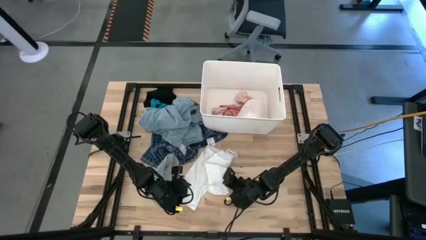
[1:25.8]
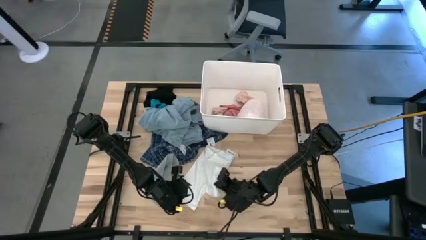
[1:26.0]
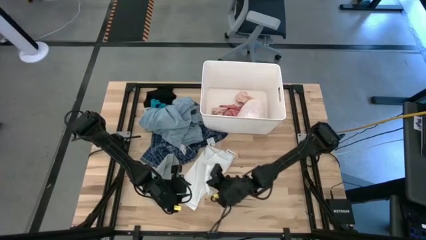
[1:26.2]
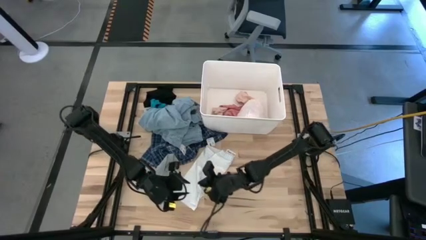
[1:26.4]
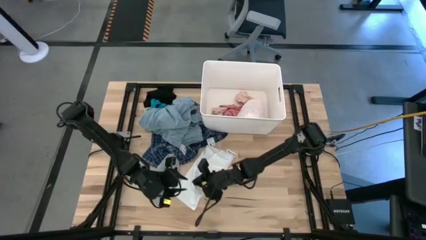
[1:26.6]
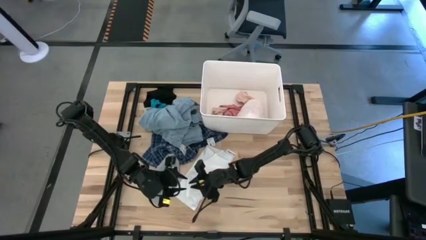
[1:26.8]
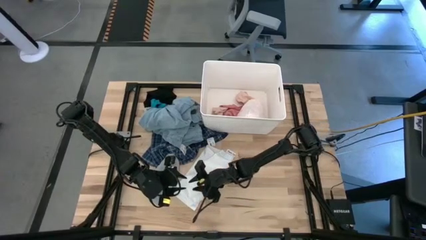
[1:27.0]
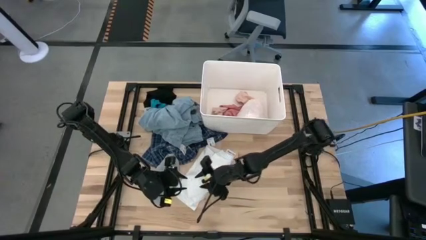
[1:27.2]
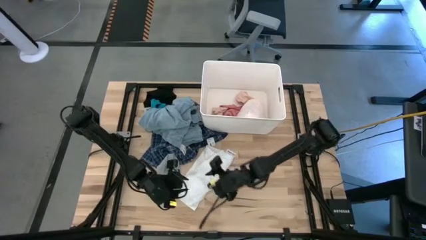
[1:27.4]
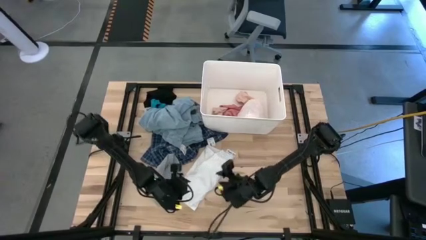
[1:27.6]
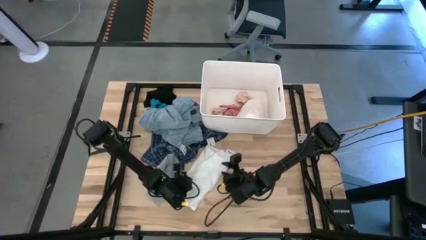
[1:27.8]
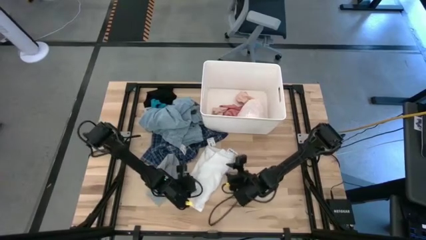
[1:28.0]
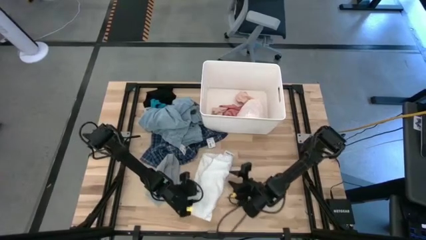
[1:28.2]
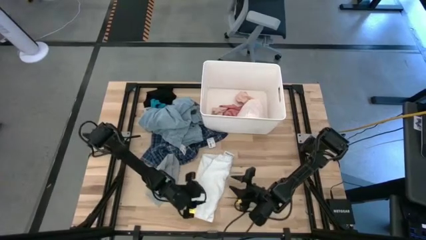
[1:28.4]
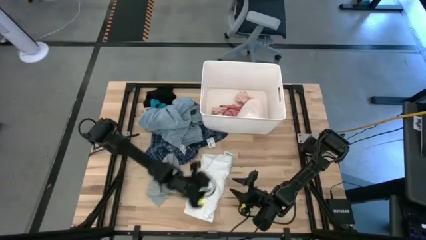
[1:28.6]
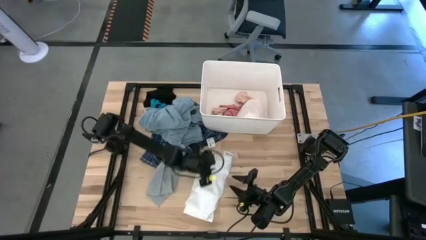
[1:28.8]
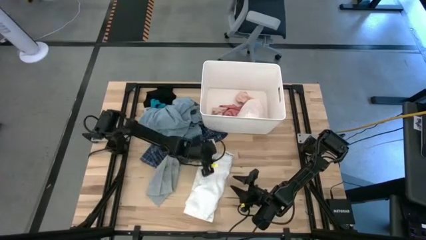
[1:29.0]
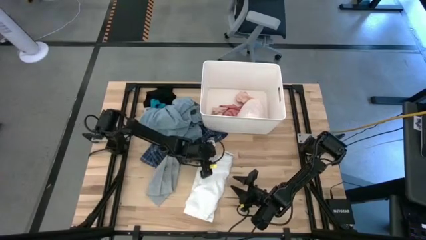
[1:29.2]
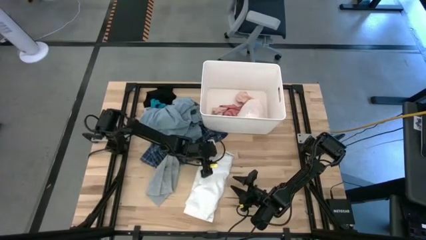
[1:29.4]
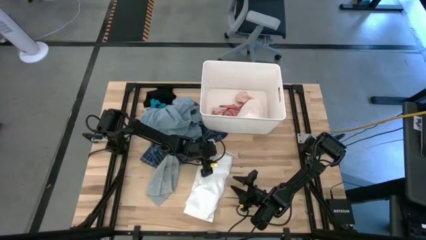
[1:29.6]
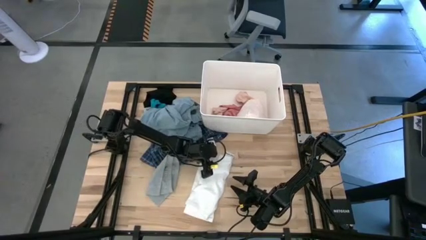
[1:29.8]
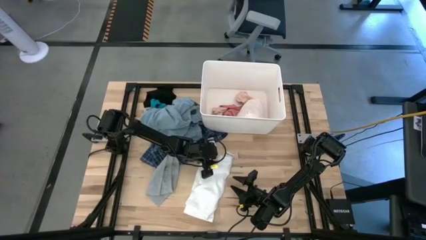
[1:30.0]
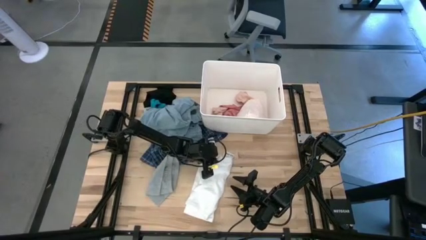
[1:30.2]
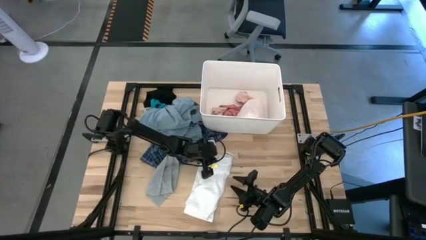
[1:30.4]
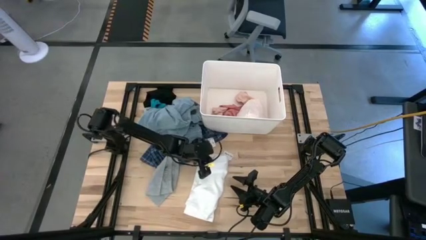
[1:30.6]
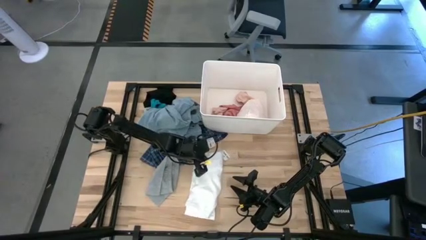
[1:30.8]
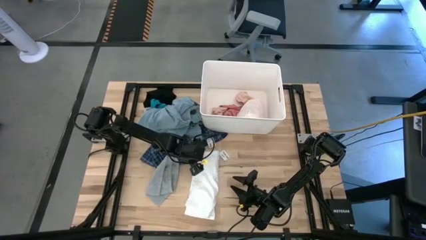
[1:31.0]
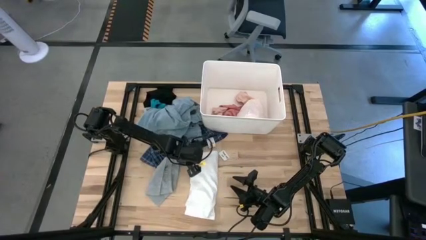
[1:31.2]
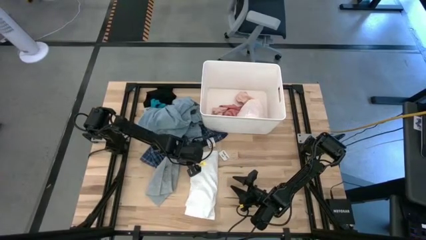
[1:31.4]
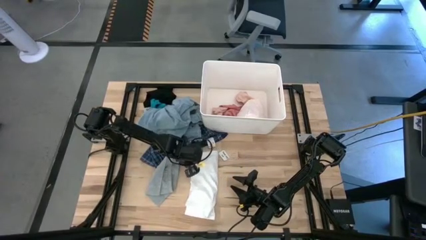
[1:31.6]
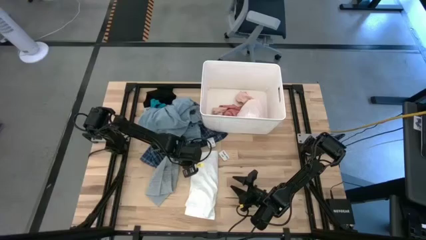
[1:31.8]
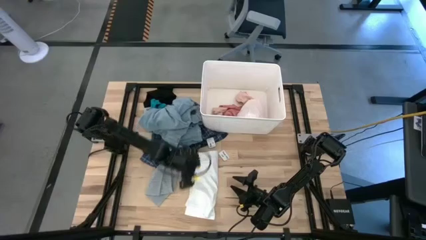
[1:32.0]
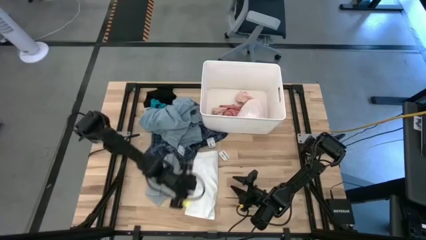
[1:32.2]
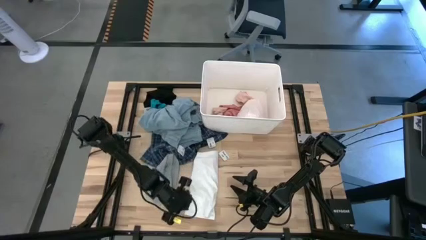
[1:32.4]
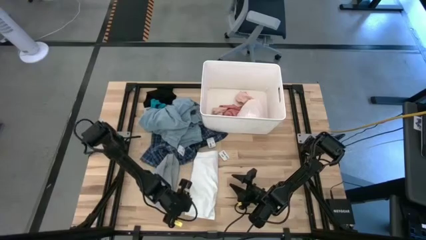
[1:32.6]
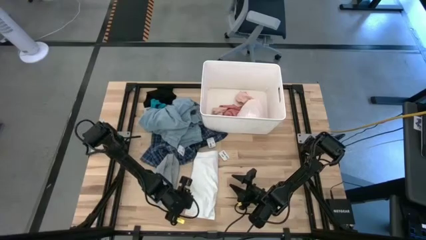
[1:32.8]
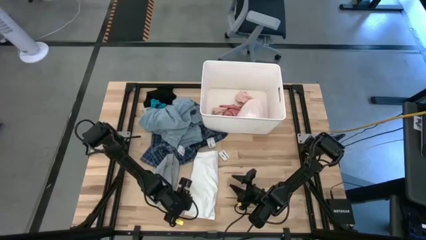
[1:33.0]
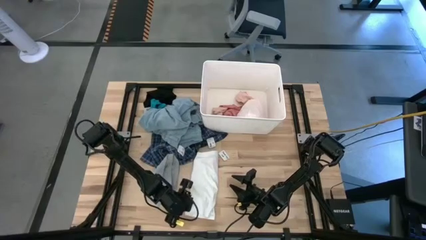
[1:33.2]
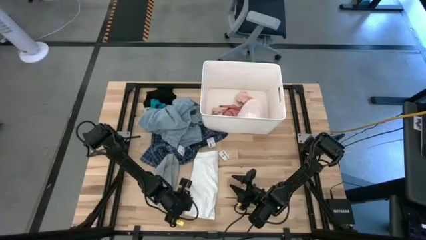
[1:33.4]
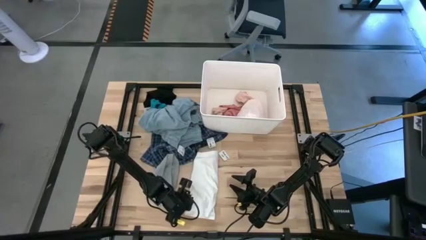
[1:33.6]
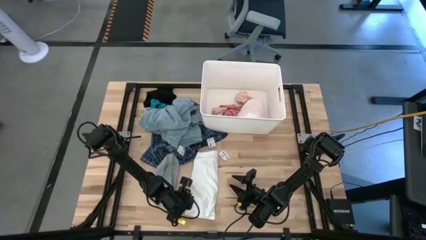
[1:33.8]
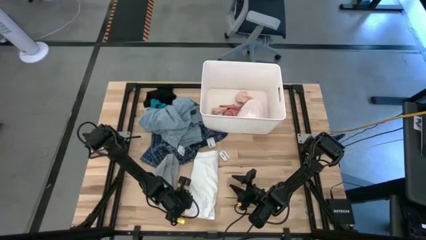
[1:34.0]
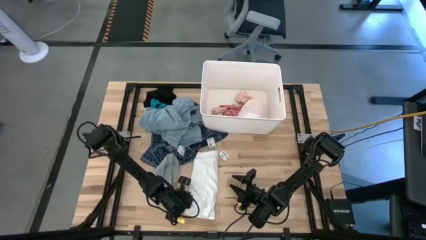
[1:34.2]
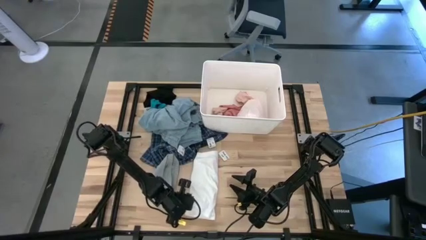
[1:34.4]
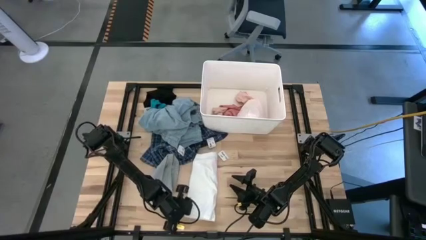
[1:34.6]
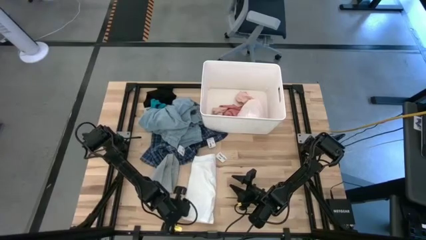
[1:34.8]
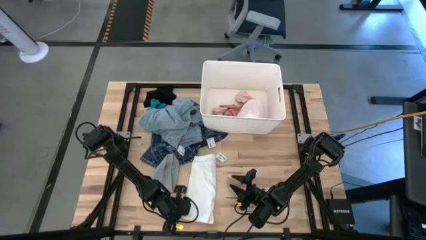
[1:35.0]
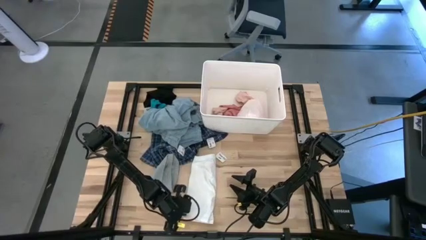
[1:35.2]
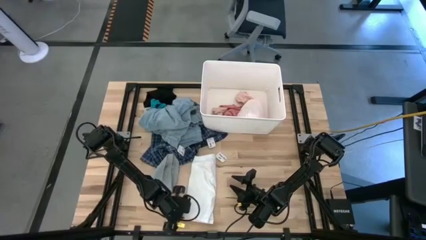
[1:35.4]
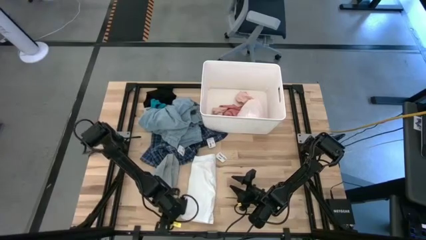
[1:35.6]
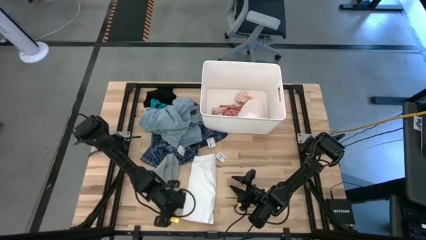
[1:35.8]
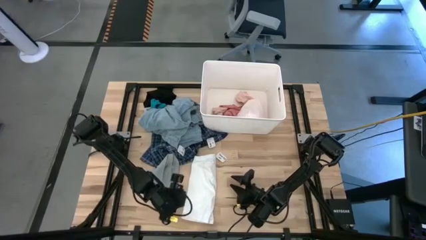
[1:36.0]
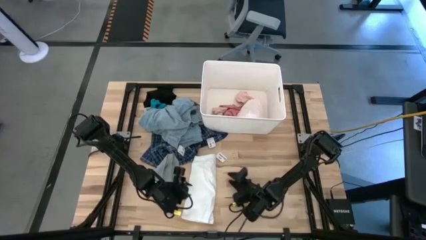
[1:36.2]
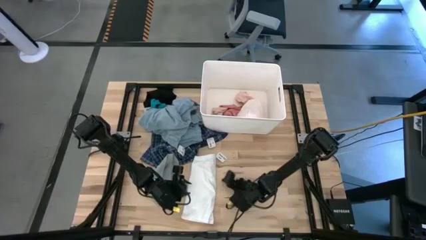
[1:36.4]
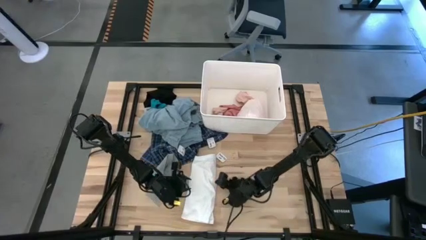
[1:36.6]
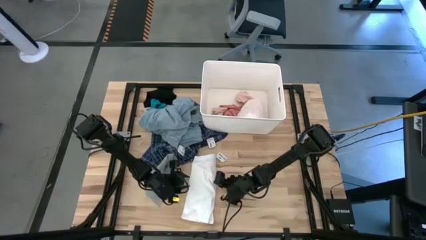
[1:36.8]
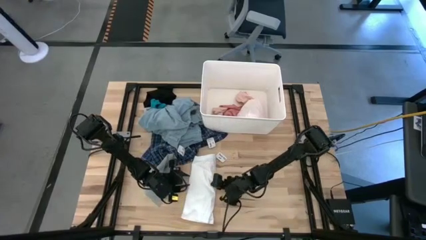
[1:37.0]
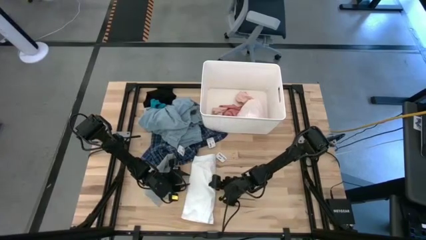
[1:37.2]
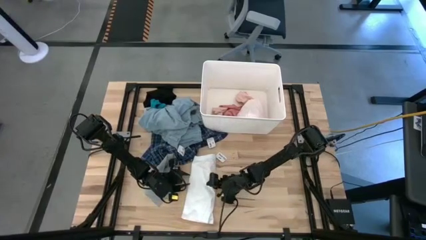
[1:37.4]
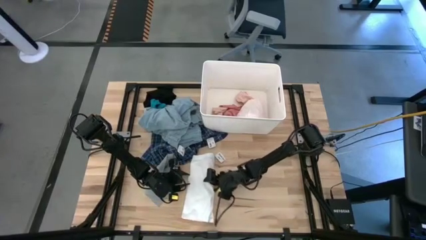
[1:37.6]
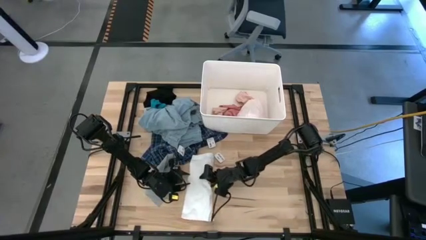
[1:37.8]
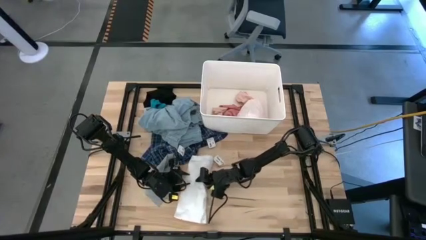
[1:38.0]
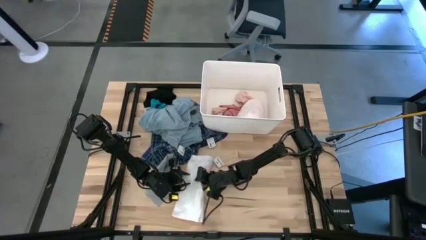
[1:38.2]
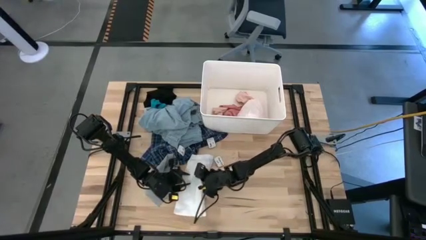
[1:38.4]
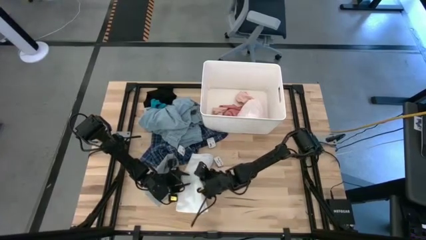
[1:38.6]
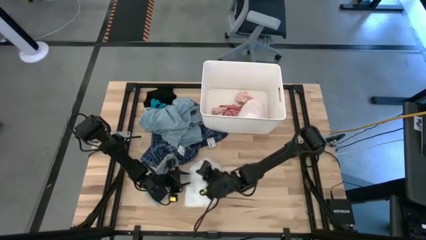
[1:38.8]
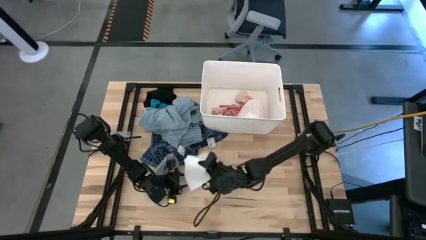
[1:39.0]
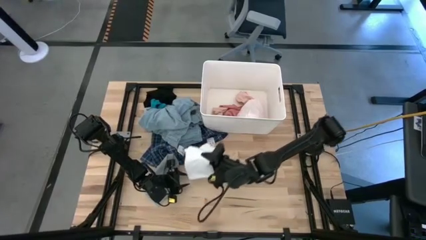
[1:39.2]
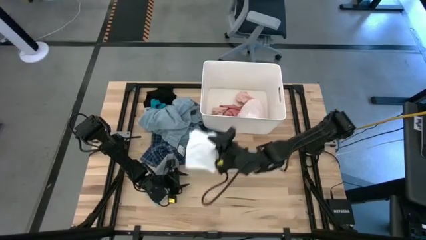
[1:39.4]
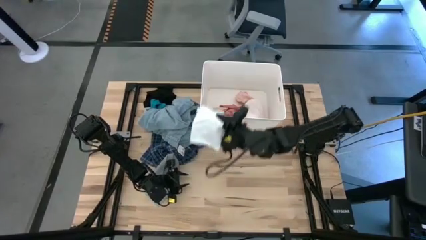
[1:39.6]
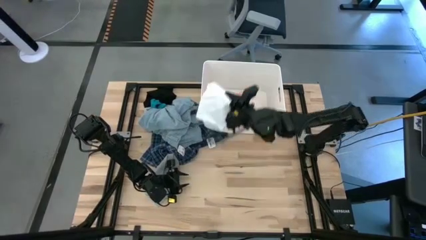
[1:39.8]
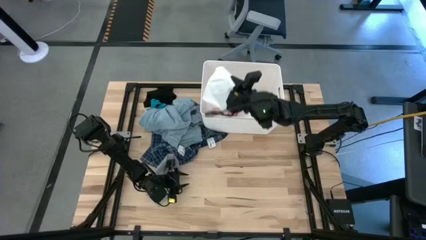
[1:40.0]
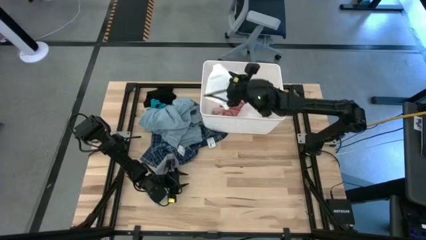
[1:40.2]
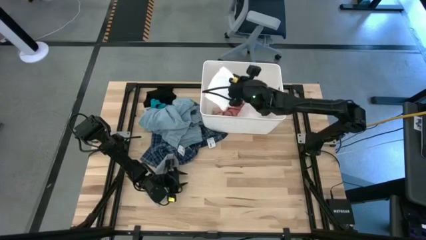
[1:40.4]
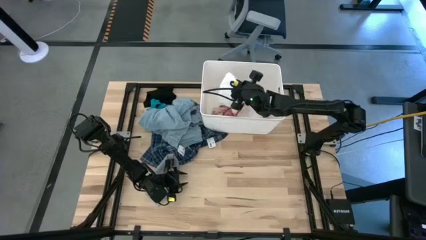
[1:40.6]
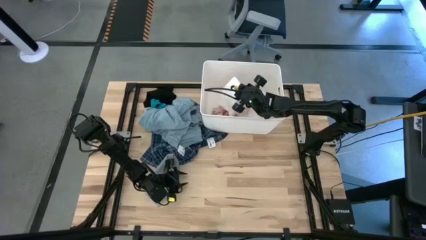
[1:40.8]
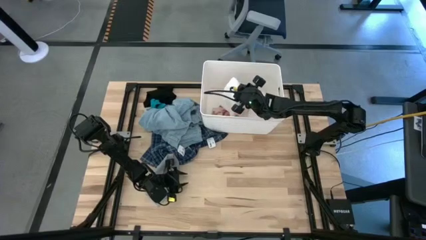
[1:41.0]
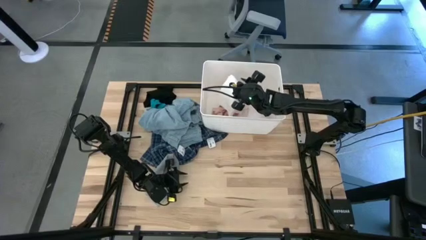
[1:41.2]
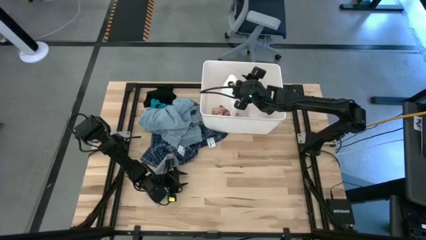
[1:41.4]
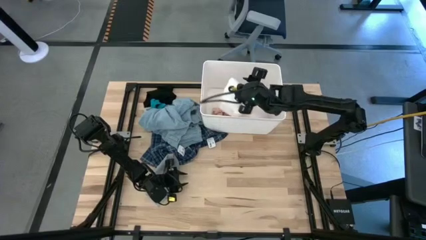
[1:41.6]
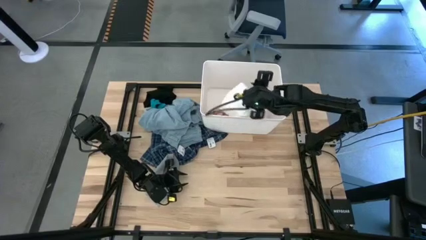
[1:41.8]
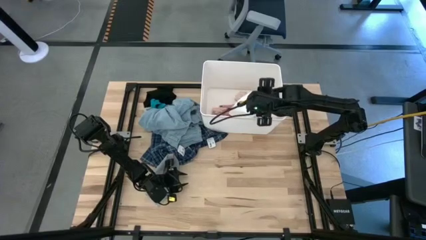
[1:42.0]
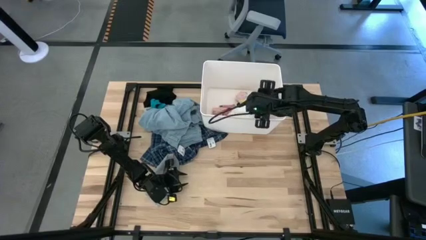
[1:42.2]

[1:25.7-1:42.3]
Task: Sort clothes
Put the white boxer into the white laundry bin
